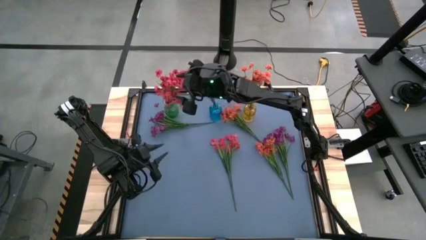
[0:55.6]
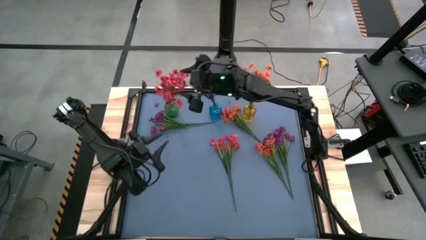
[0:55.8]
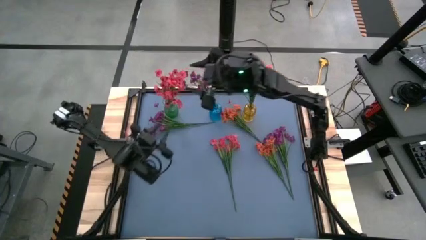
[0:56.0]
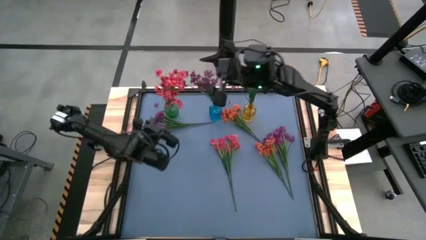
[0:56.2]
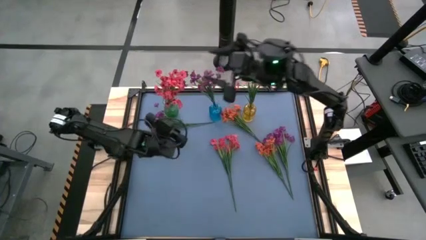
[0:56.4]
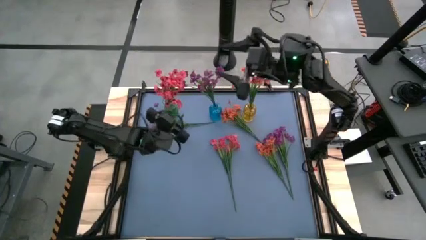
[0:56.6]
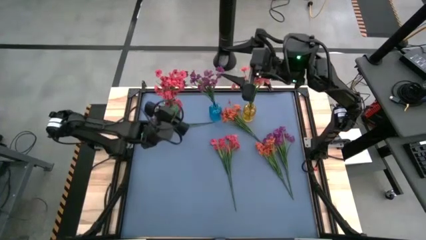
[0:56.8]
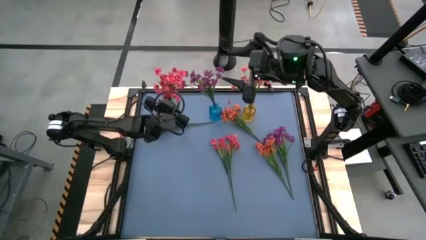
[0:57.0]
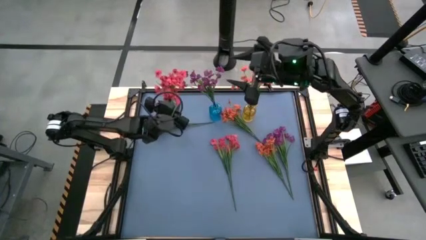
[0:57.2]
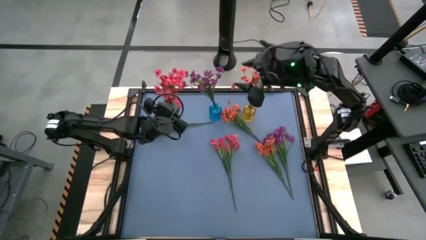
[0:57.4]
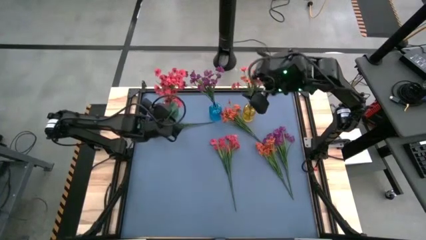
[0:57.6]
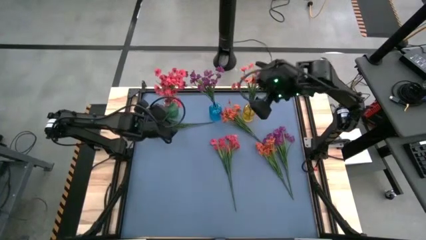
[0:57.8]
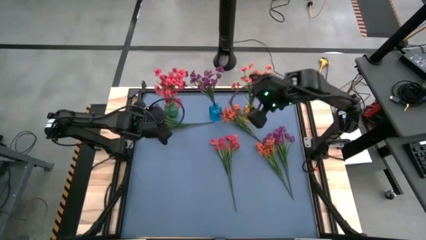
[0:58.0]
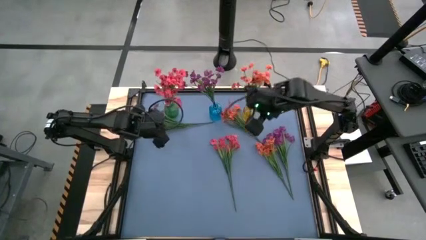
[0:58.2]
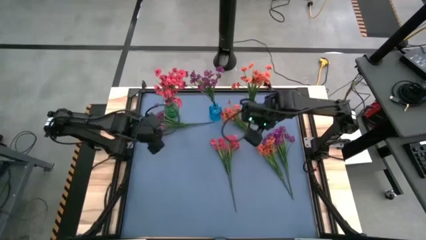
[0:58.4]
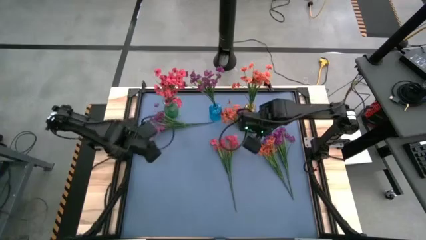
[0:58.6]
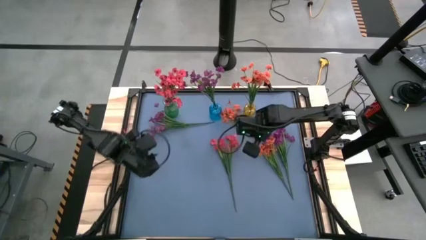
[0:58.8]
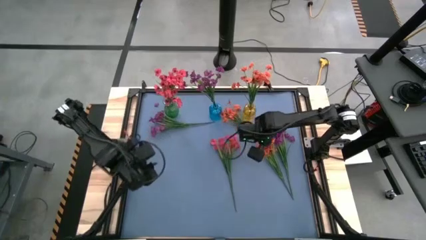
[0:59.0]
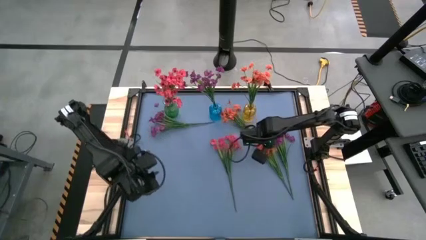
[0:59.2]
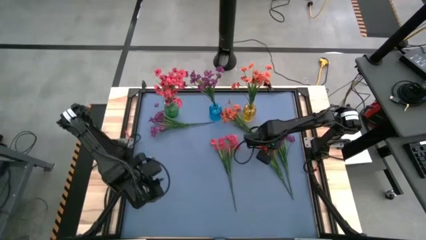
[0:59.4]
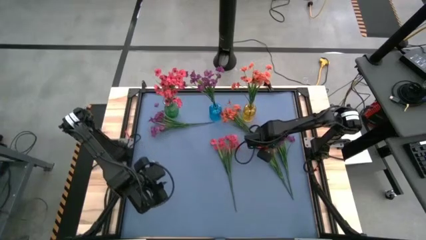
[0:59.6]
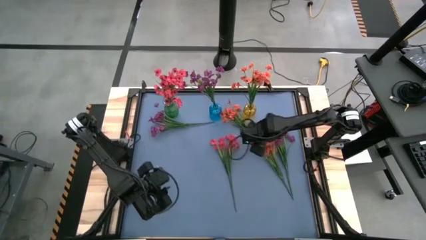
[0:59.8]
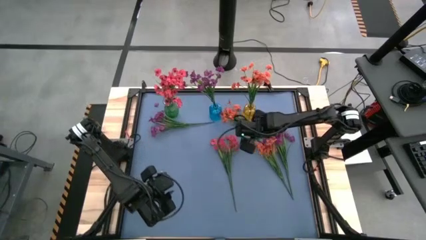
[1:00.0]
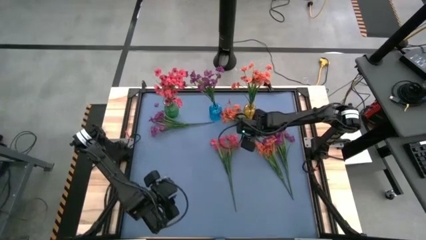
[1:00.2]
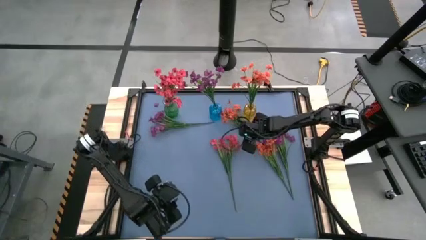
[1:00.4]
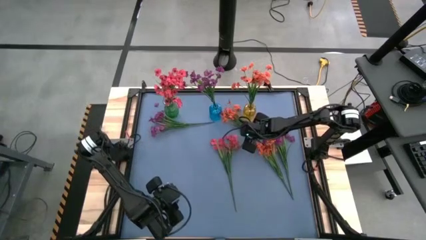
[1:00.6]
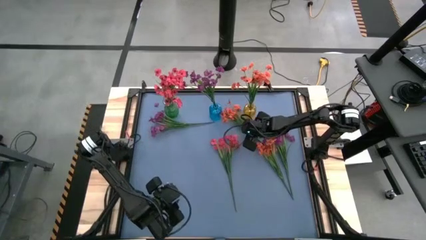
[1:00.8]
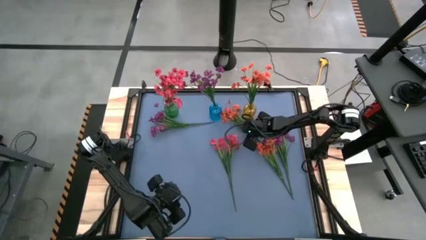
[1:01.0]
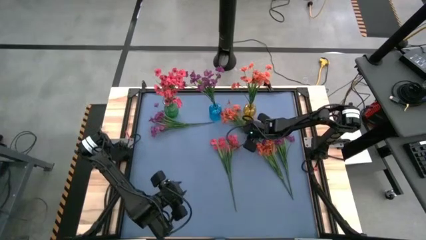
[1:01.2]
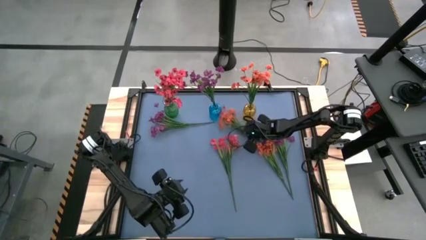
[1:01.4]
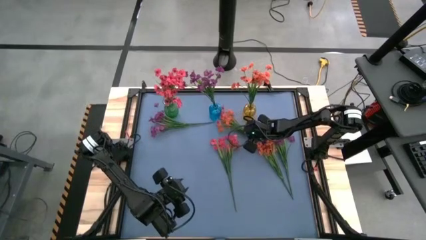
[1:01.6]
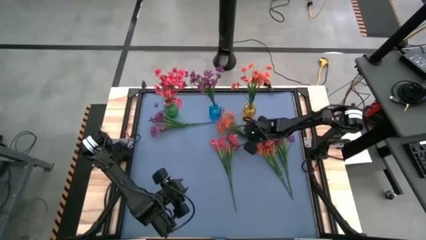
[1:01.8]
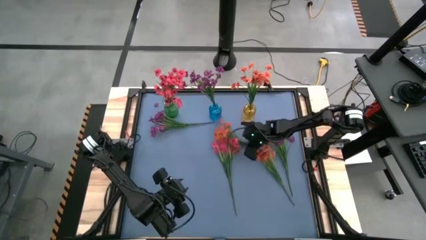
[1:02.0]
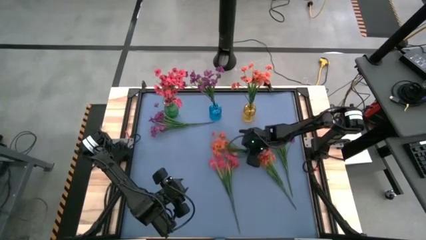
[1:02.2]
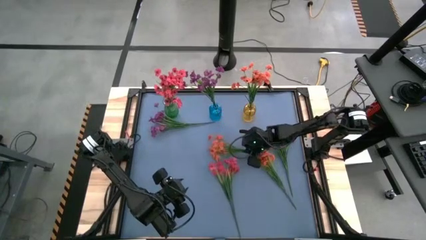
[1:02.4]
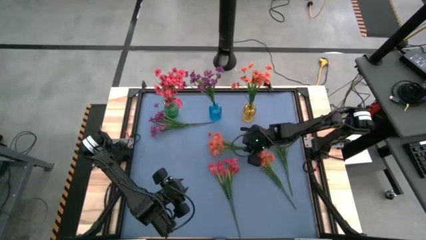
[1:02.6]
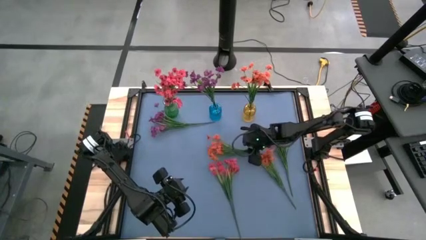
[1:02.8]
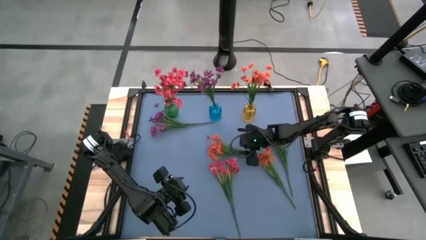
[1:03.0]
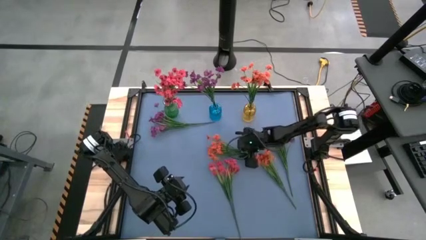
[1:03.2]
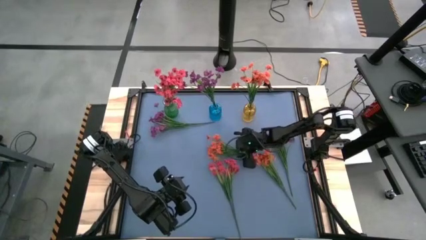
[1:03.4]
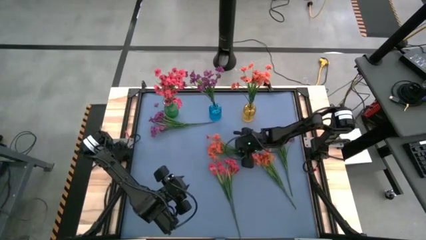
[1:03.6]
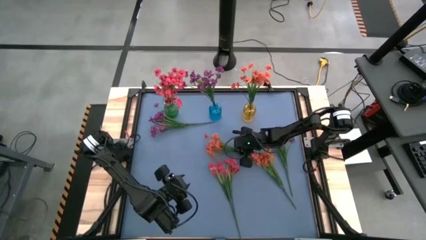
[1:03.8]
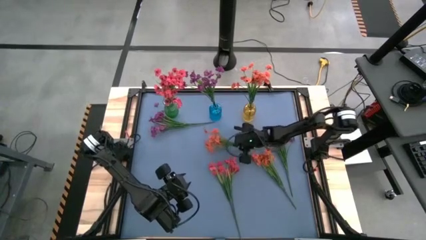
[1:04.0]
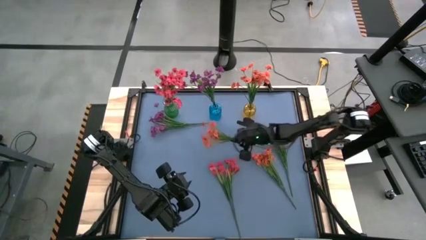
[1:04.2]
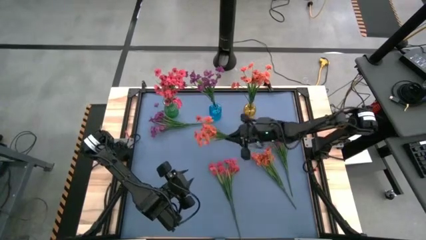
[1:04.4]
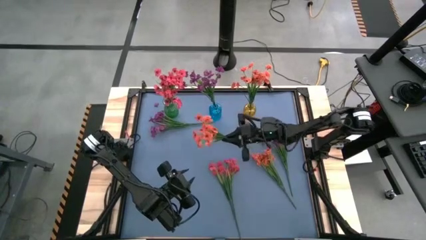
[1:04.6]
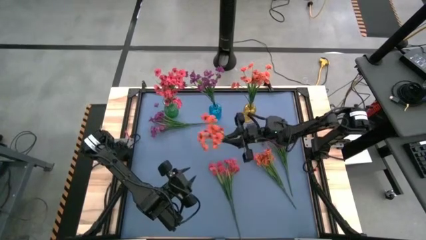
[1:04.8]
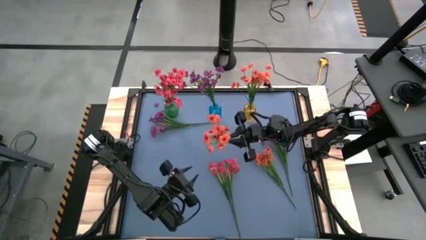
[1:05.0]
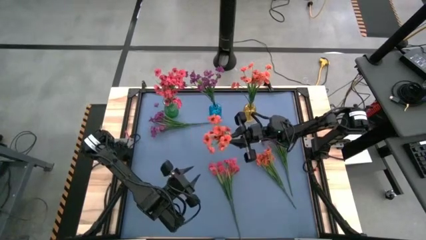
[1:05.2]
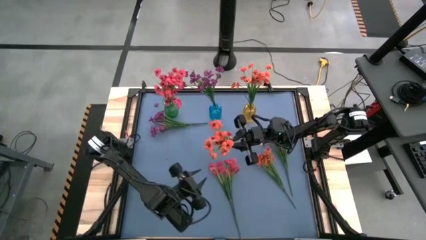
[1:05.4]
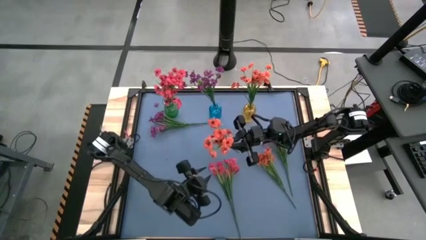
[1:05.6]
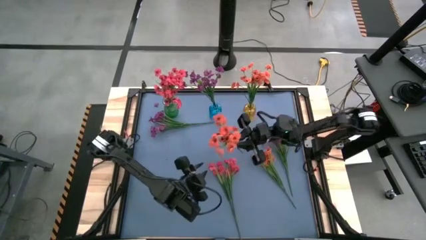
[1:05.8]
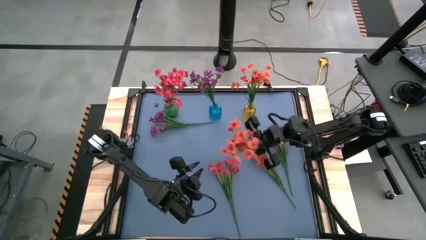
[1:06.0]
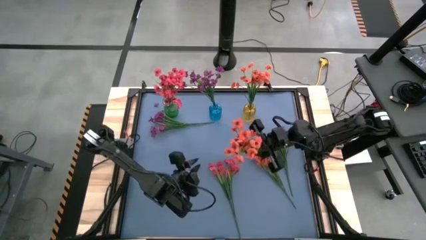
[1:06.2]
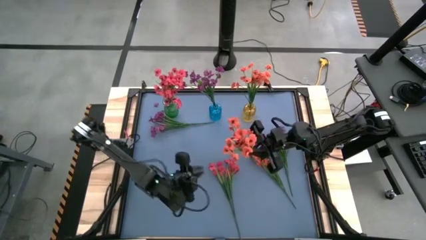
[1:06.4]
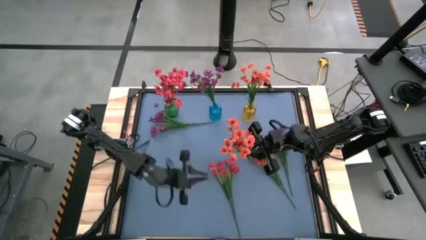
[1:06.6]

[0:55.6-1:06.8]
Task: Sort flowers into vase by color
Put the top orange flower into the yellow vase

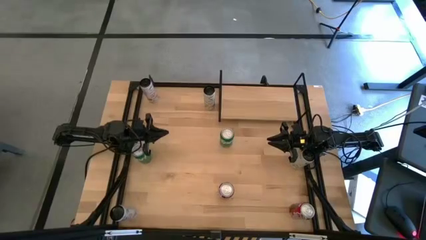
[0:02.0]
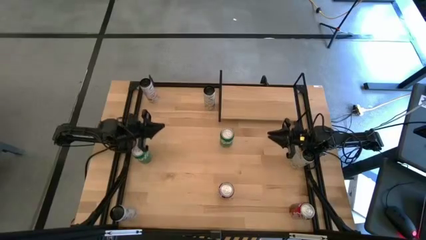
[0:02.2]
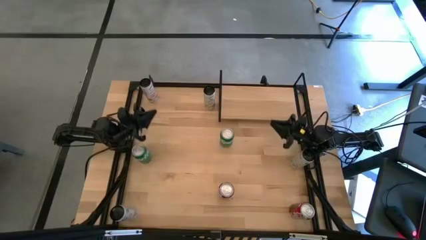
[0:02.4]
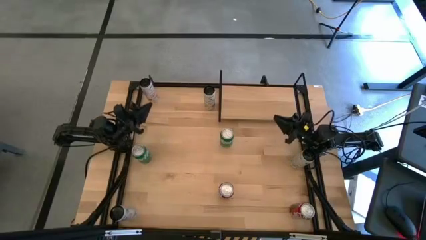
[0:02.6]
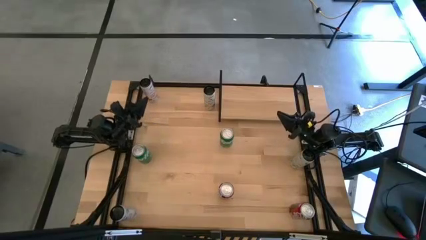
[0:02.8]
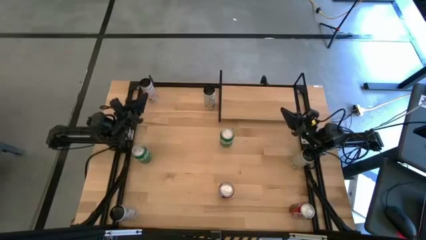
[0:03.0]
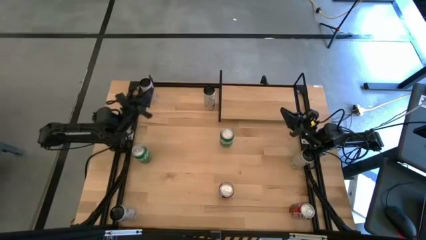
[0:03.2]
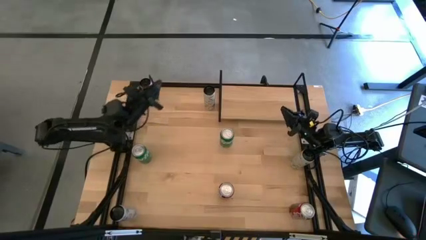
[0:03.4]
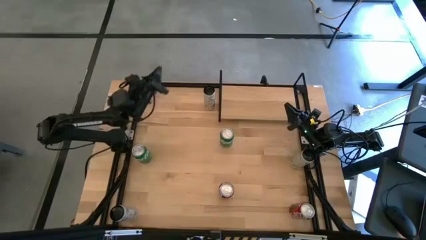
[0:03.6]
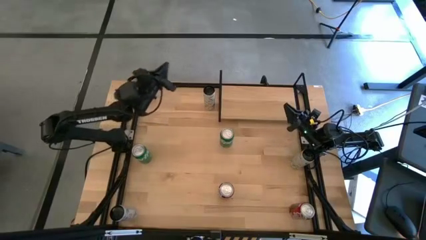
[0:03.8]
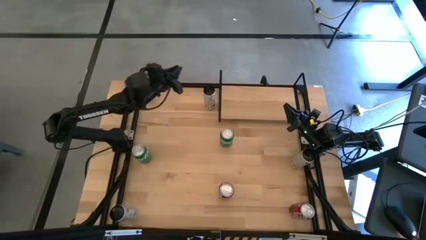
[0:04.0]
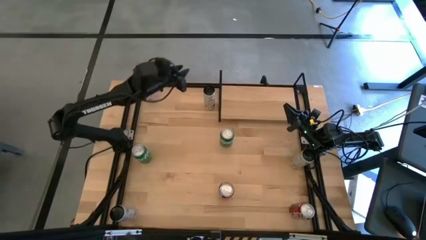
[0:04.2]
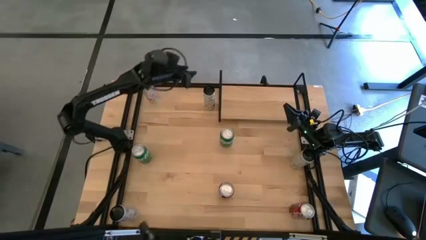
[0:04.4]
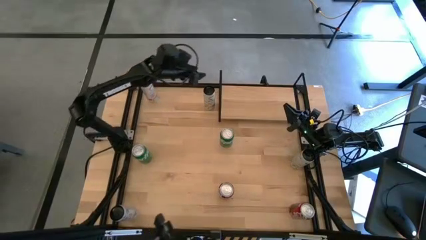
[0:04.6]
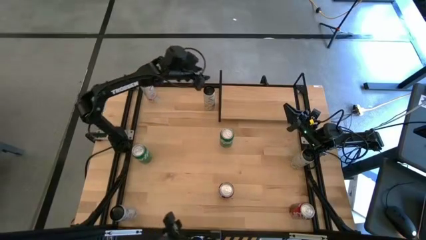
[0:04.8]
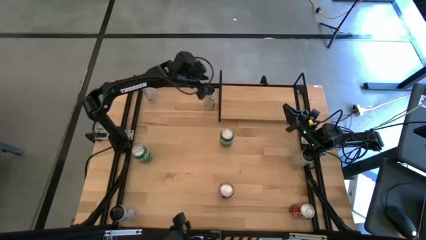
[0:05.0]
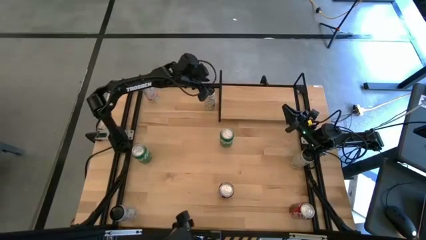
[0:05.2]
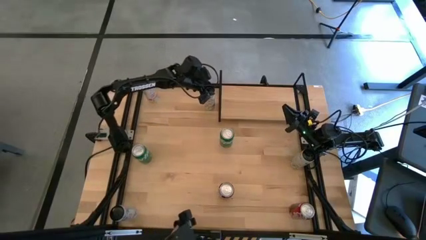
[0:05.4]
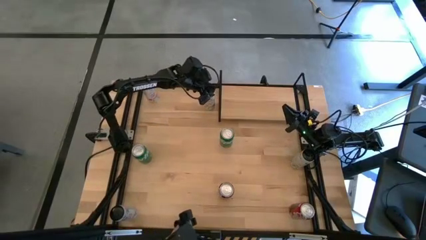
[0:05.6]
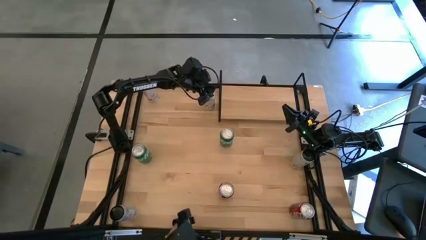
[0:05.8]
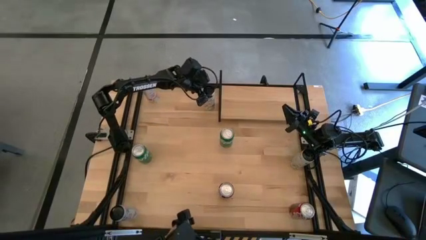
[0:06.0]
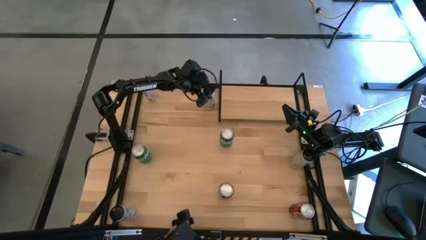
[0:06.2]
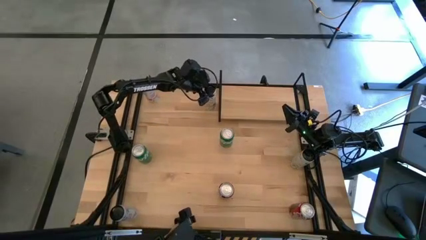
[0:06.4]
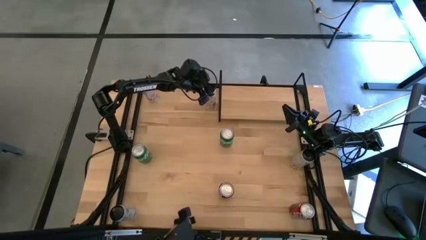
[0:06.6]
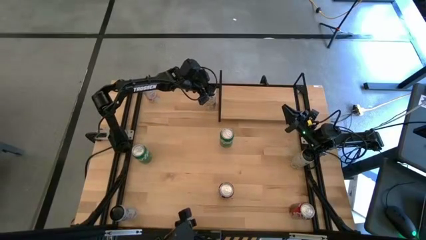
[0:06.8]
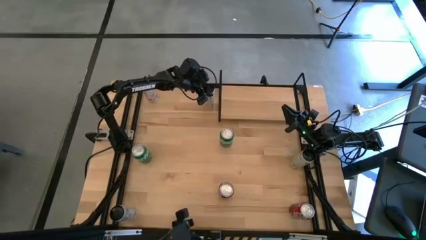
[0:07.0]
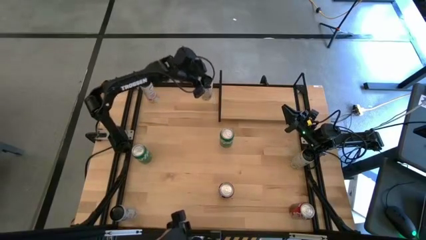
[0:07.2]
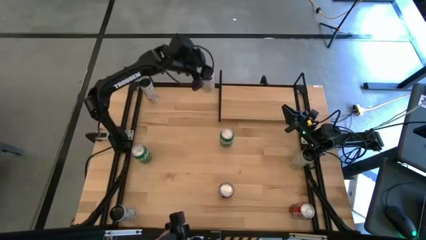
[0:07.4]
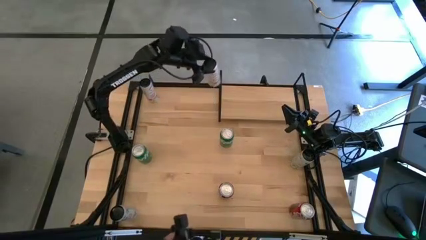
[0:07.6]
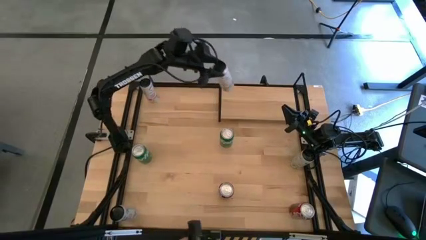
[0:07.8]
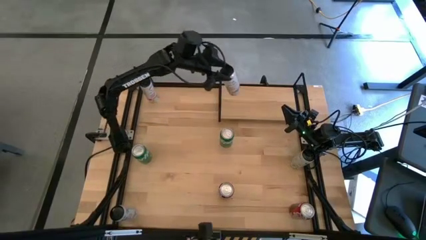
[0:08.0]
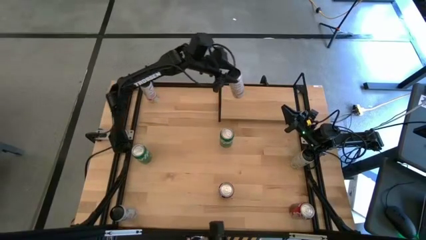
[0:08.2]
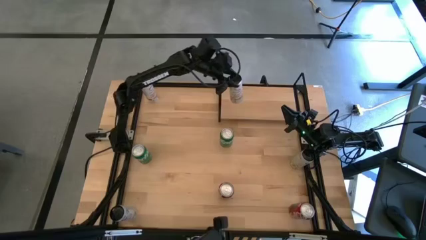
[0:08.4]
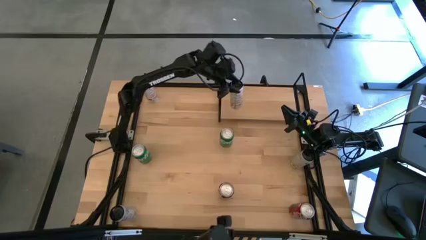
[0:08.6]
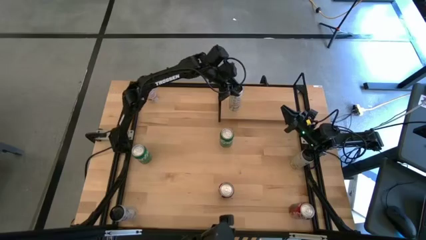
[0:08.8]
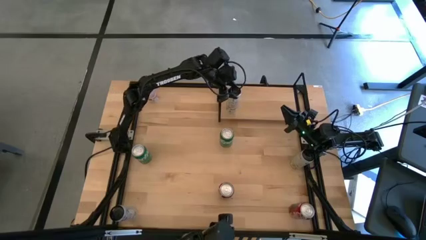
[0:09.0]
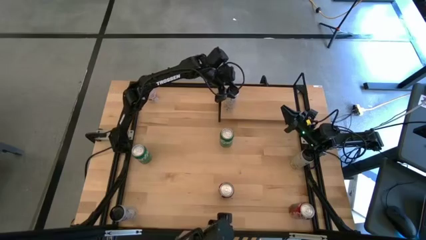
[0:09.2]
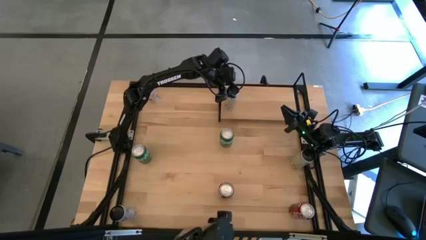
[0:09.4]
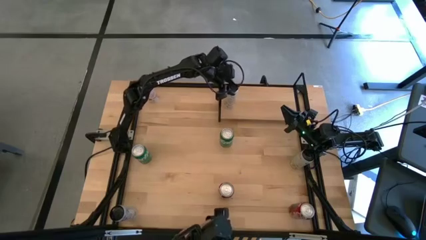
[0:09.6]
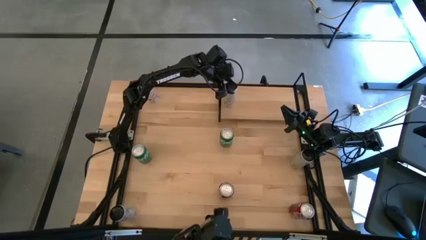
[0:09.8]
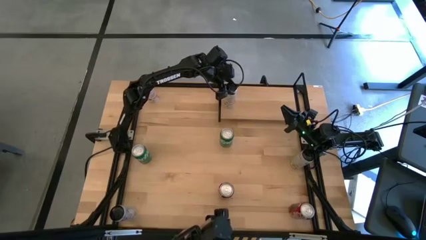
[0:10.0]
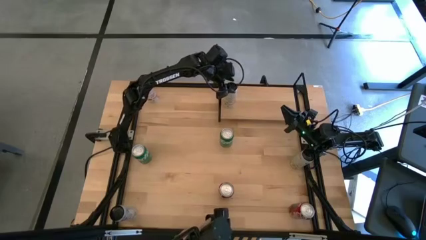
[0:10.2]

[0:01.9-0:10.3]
Task: Place canned beverage on shelf
Put the top white-yellow soda can on the shelf
